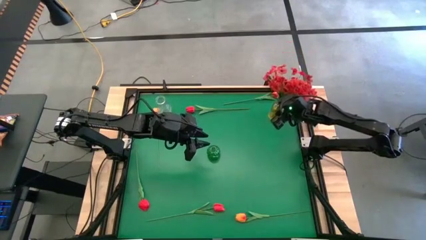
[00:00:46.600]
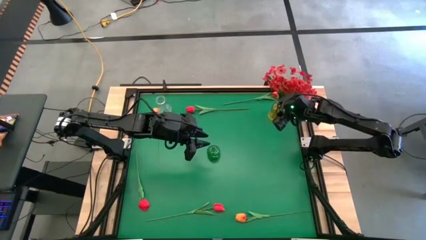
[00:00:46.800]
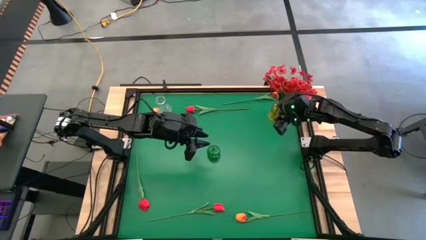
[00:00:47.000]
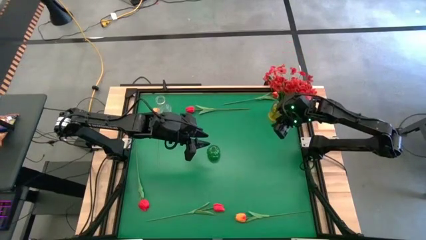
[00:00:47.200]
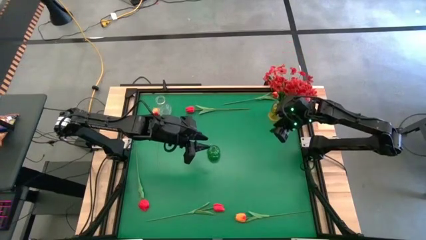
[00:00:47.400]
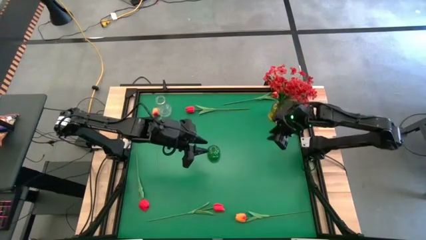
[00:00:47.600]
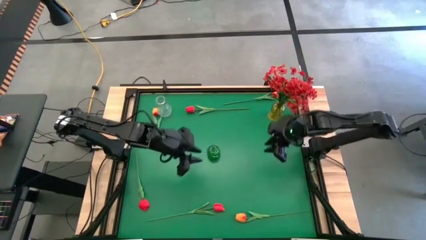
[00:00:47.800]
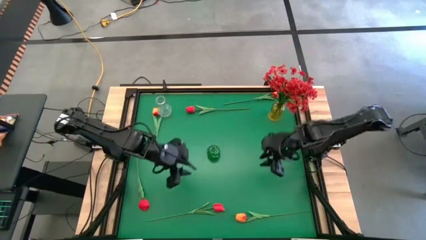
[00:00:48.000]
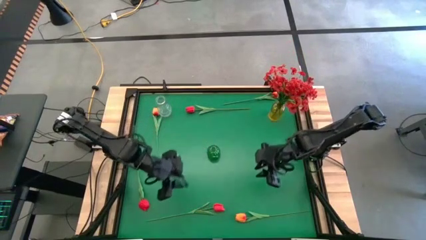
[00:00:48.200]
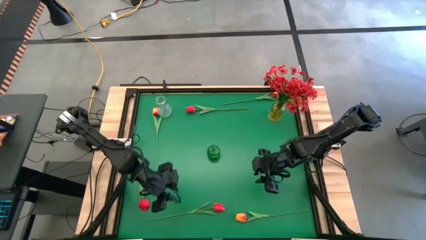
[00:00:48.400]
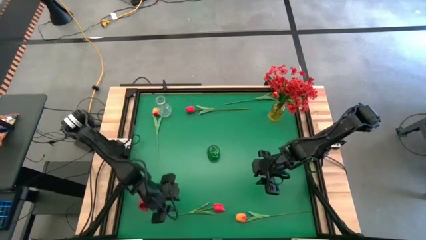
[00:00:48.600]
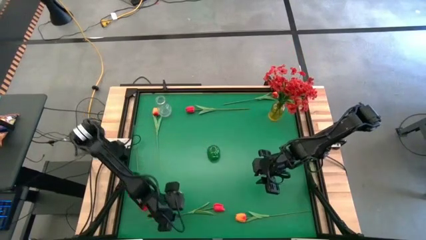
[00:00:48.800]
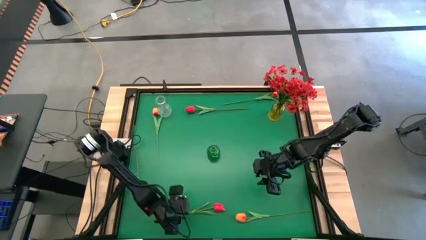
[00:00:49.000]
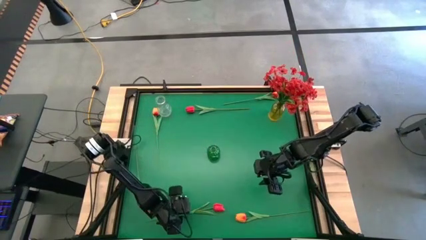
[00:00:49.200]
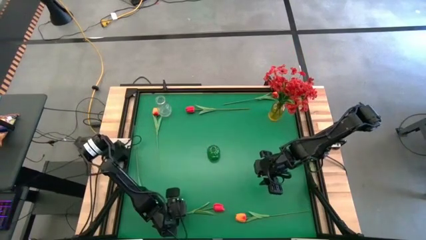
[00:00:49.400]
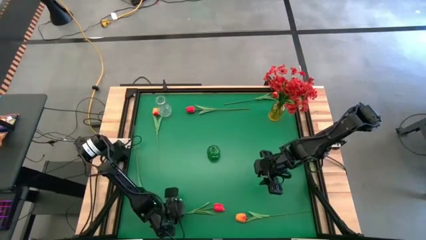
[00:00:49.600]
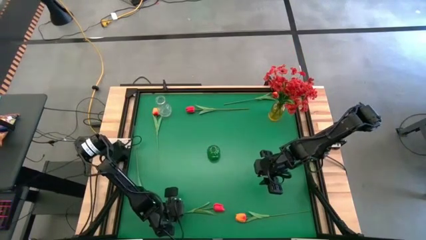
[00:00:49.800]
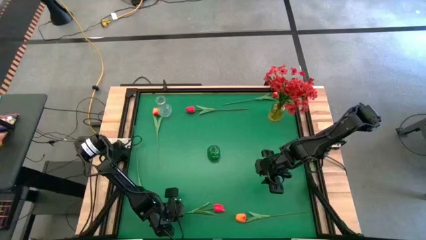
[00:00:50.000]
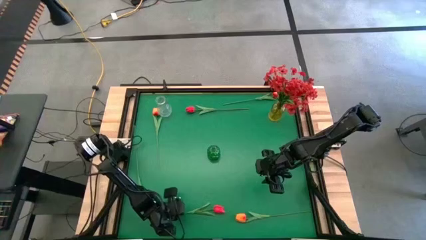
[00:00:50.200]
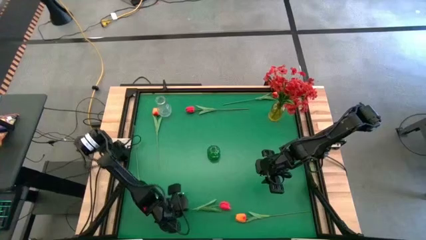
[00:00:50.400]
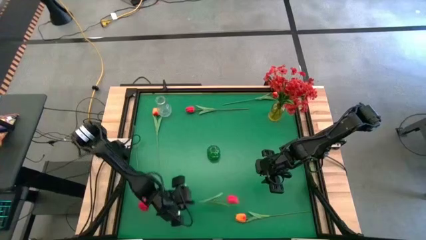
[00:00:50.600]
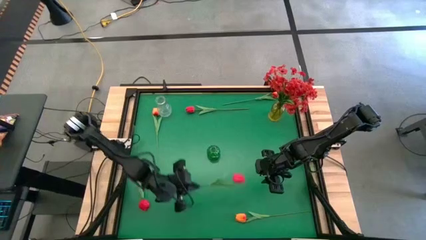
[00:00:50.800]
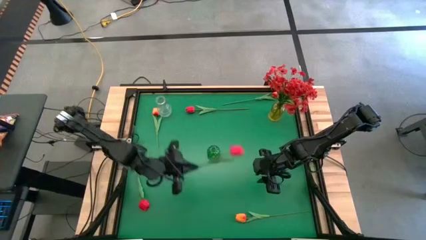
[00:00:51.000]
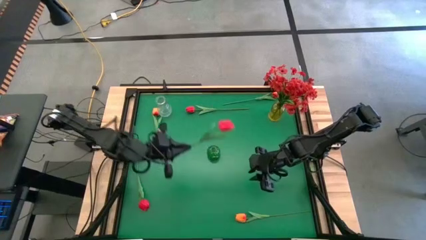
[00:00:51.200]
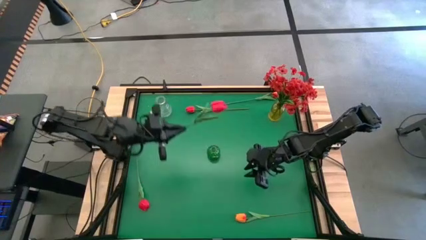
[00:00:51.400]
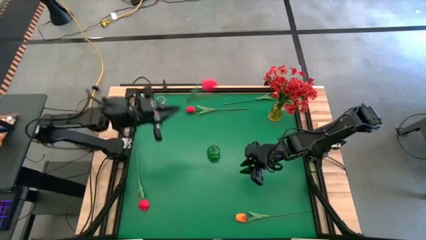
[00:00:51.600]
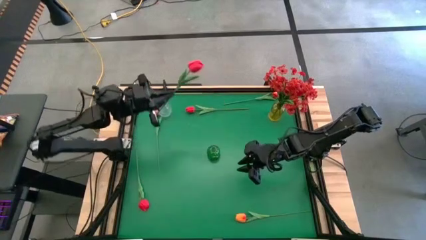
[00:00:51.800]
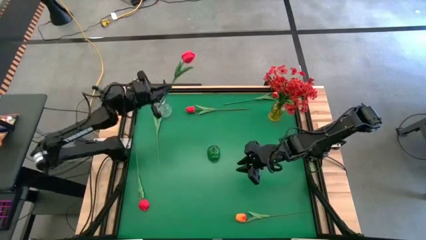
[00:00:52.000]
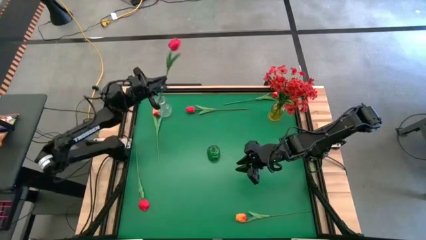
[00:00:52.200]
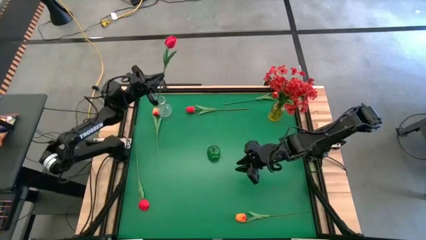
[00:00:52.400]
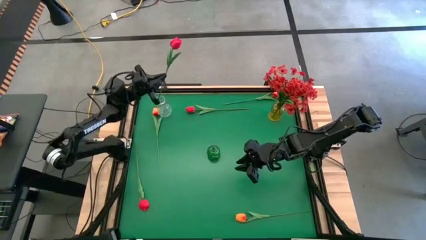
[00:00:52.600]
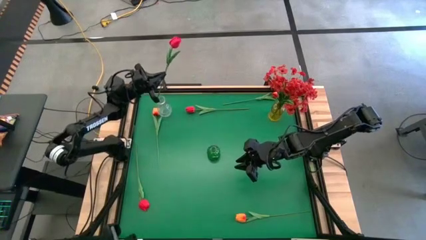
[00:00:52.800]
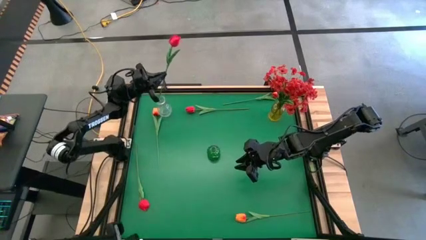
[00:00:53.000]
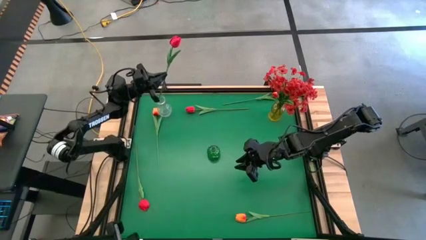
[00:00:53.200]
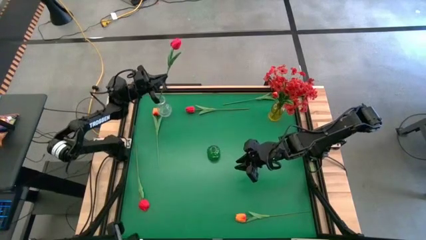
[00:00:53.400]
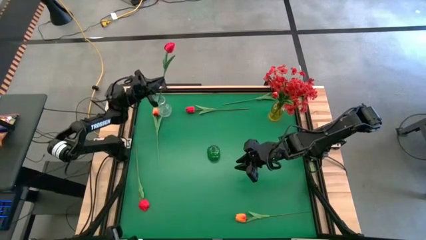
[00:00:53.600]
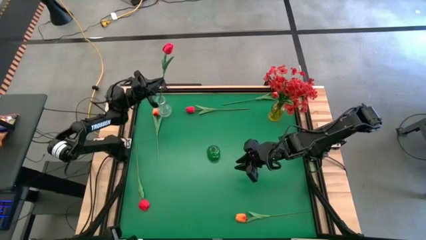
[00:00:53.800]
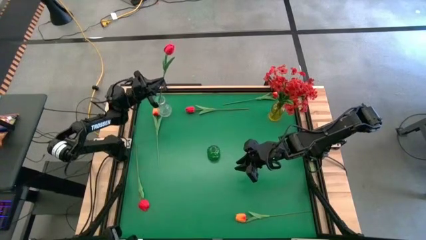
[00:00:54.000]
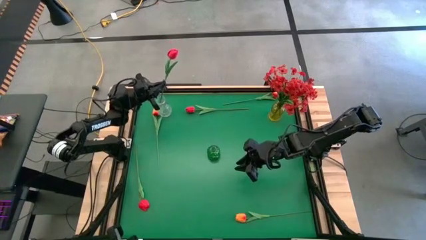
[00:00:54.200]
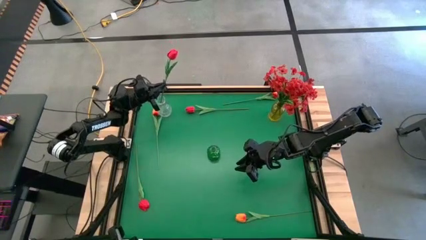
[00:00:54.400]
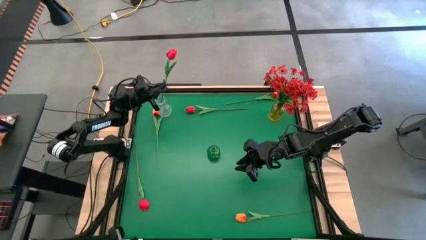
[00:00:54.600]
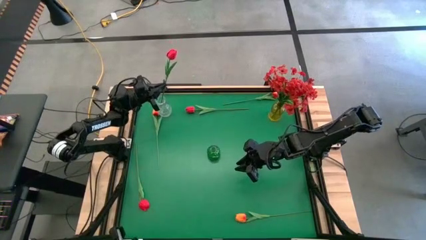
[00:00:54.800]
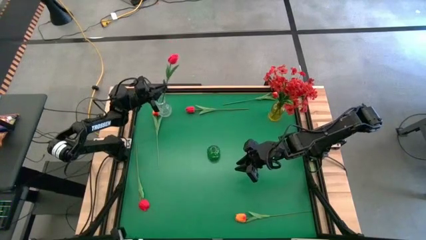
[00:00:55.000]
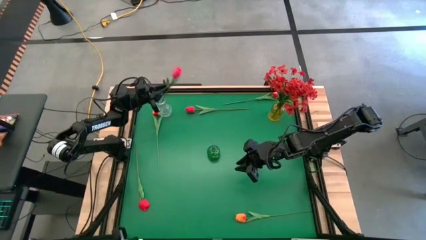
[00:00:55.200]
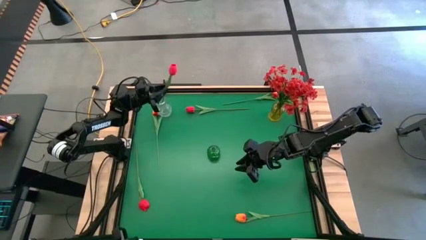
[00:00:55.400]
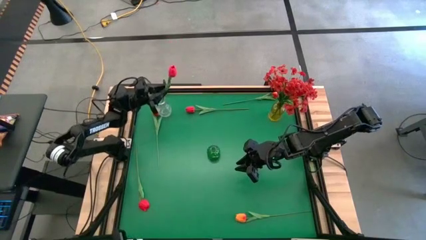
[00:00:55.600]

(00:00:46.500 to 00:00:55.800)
Task: Sort flowers into vase by color
Put the bottom red tulip into the transparent vase

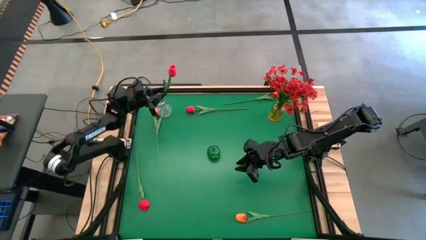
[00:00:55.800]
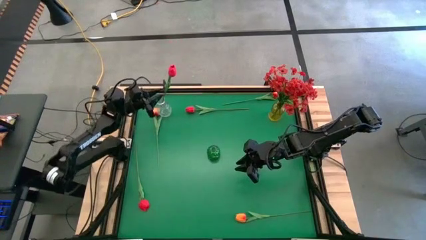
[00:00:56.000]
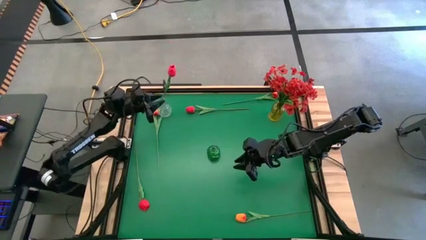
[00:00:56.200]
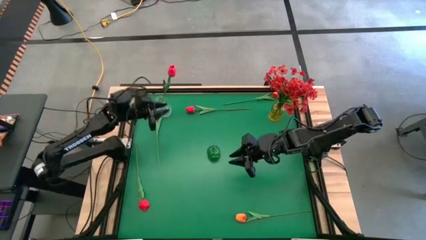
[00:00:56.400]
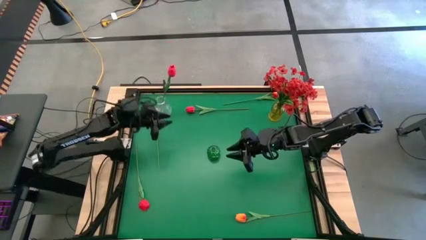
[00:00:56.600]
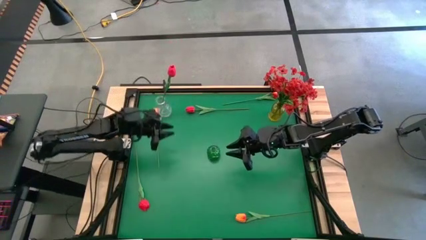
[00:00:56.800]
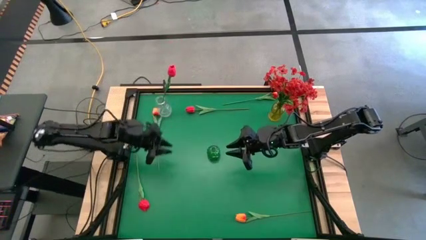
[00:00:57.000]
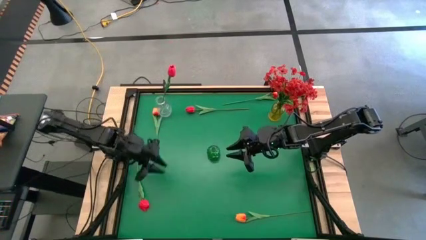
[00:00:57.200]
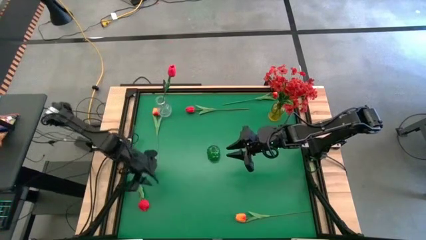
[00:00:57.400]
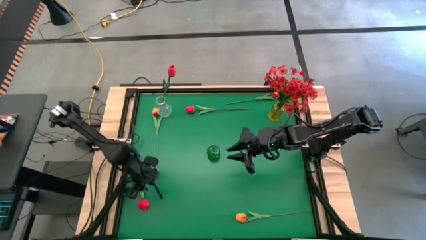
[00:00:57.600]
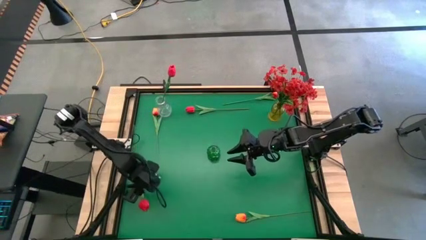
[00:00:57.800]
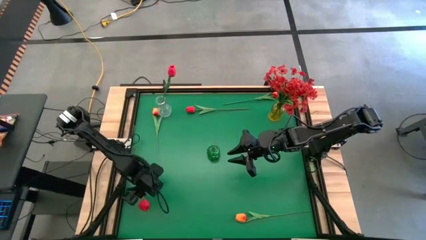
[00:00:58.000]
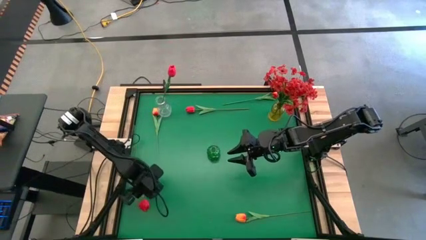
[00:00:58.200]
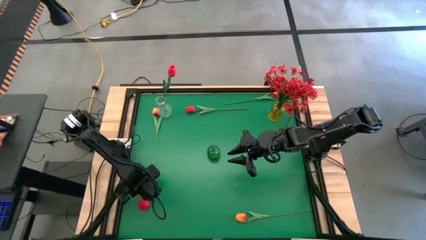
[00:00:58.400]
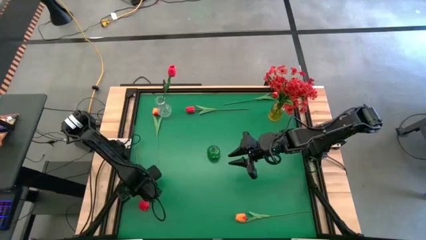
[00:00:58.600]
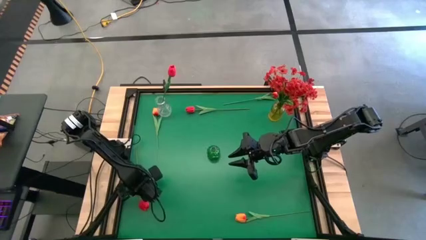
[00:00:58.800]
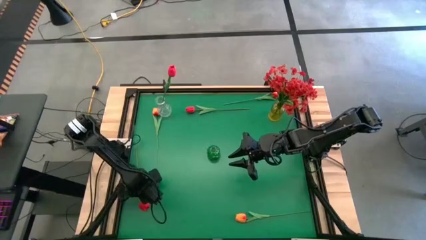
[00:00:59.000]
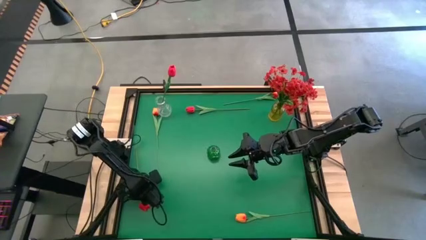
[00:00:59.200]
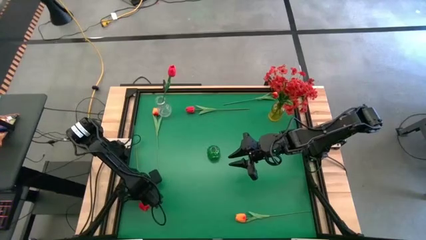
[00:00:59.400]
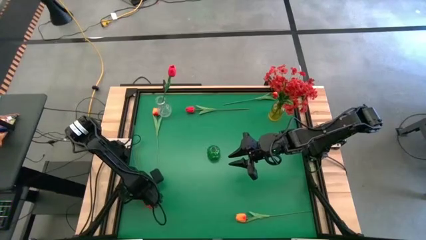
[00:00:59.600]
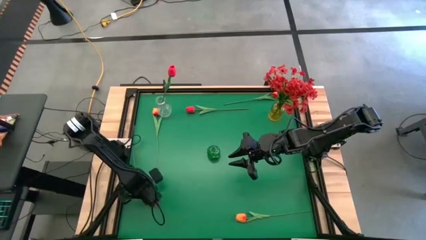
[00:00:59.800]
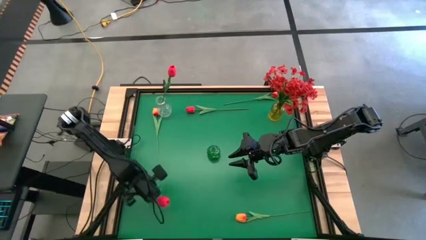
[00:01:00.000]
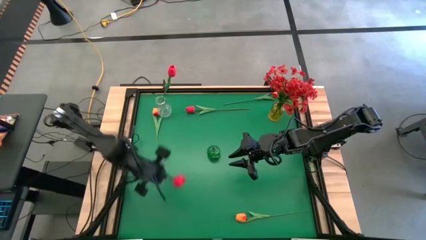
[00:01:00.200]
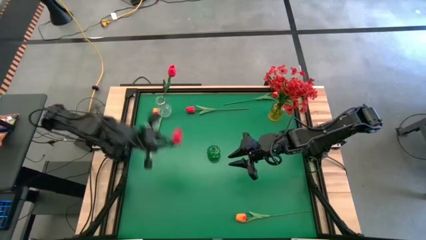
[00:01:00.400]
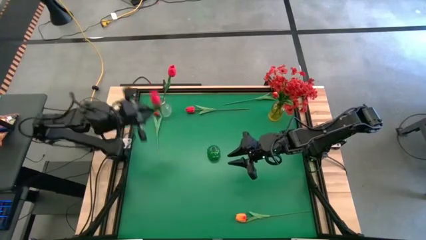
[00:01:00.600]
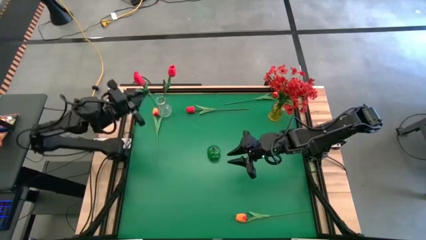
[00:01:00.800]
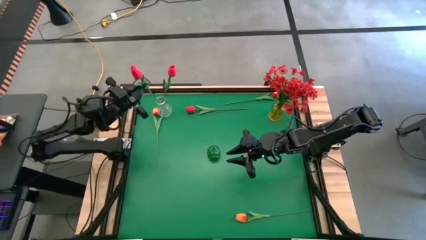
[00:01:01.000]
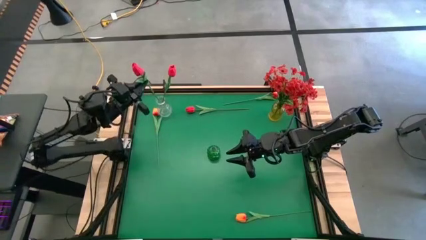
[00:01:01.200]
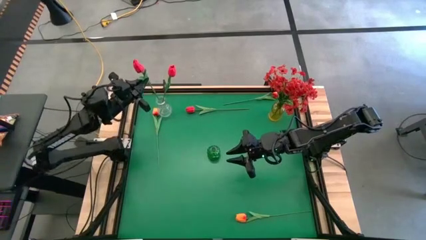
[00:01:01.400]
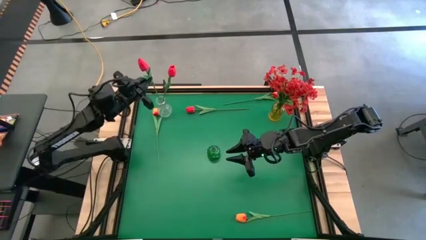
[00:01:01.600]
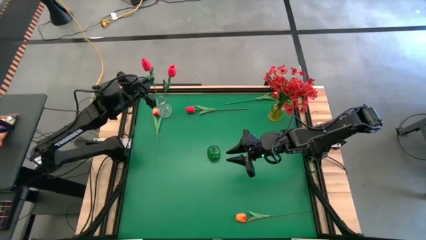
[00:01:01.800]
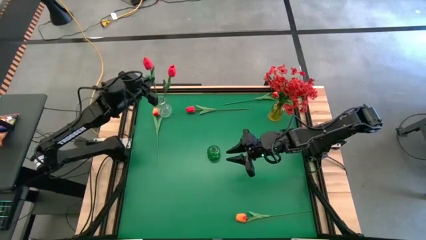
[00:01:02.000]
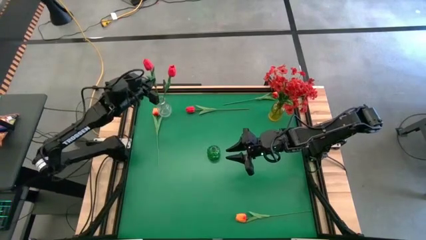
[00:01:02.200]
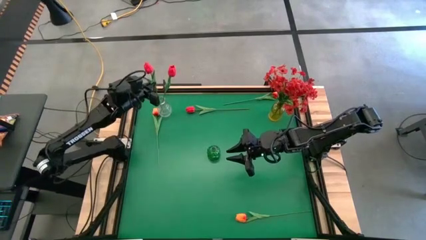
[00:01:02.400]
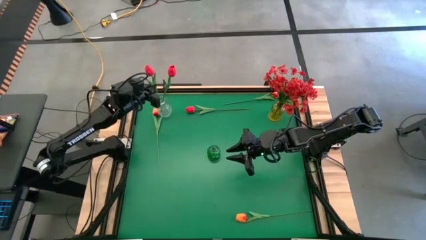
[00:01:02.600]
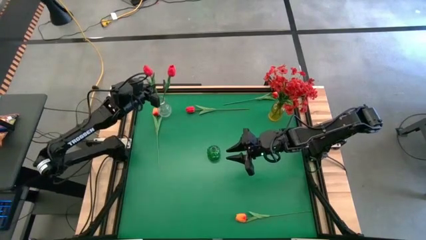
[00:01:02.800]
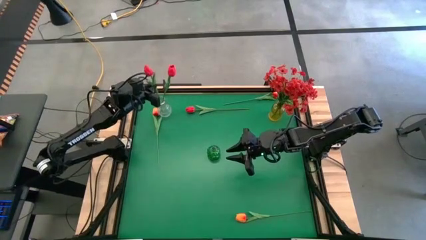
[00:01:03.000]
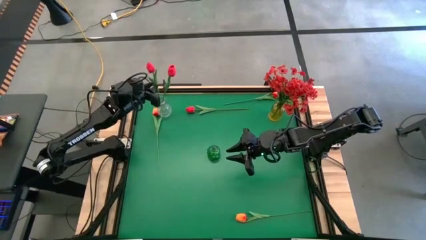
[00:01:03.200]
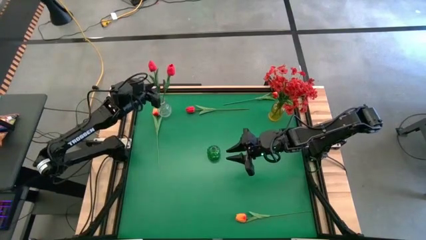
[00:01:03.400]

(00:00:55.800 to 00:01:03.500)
Put the bottom red tulip into the transparent vase
